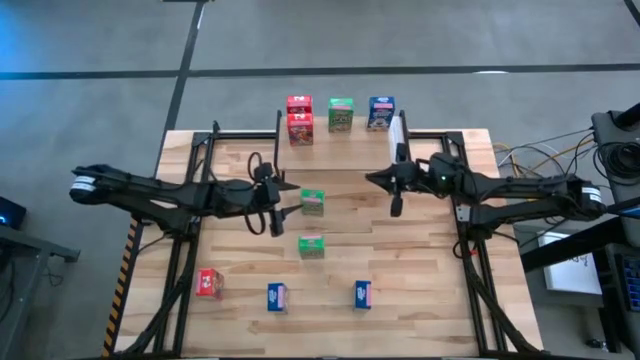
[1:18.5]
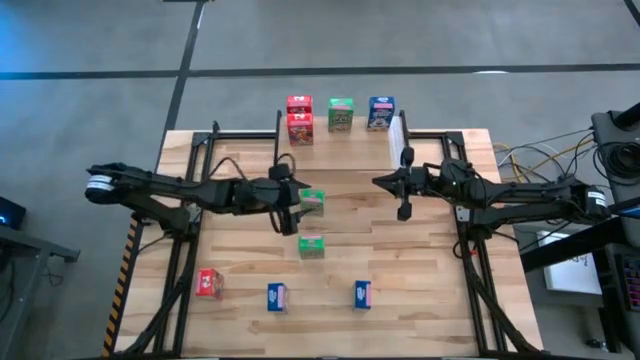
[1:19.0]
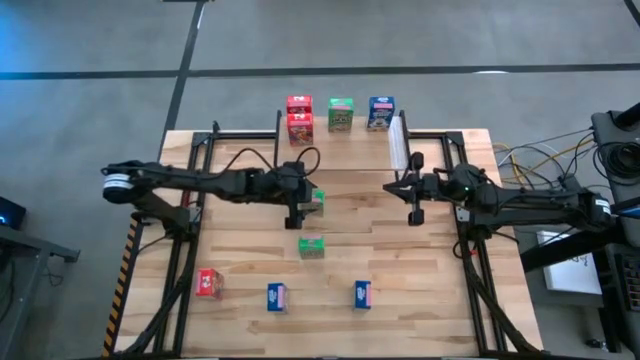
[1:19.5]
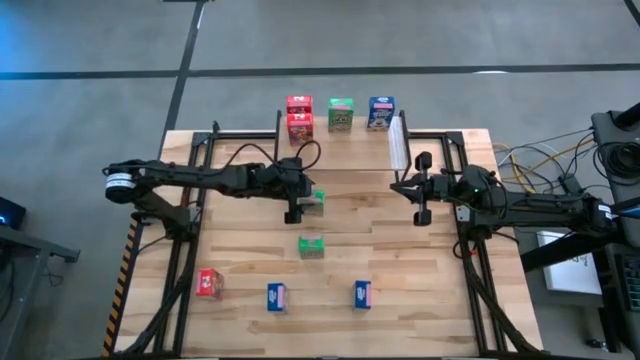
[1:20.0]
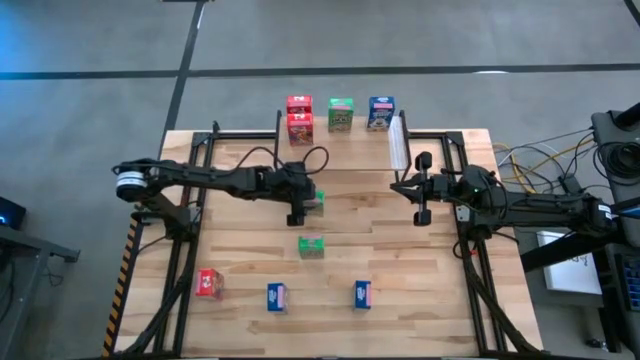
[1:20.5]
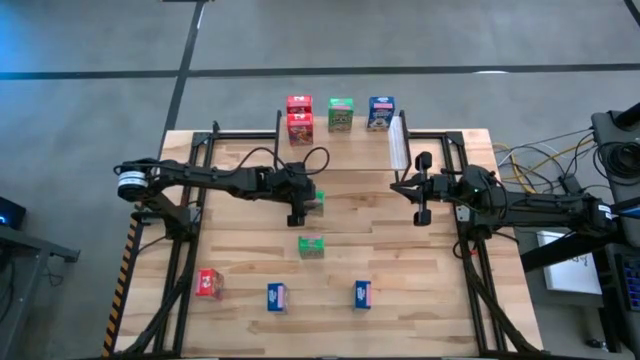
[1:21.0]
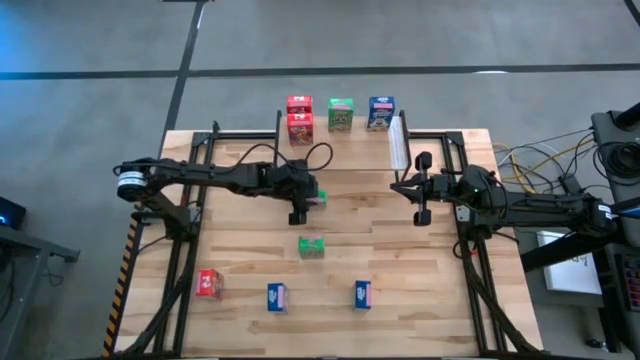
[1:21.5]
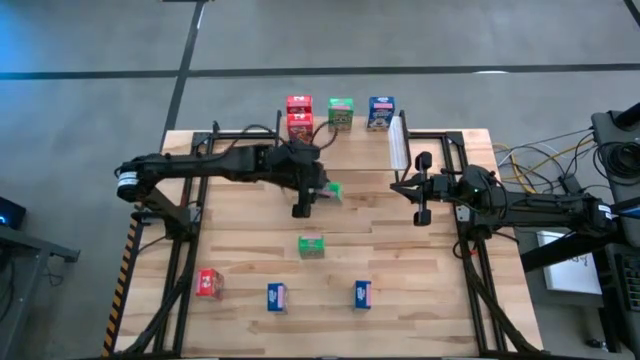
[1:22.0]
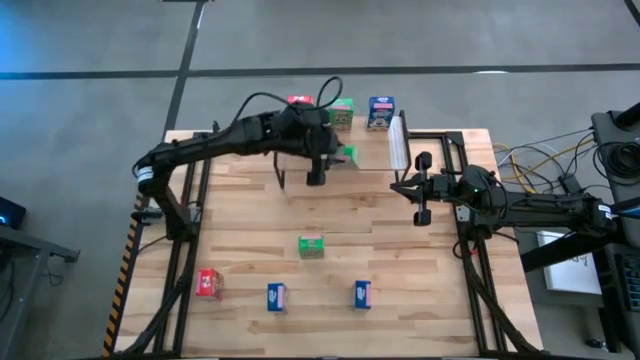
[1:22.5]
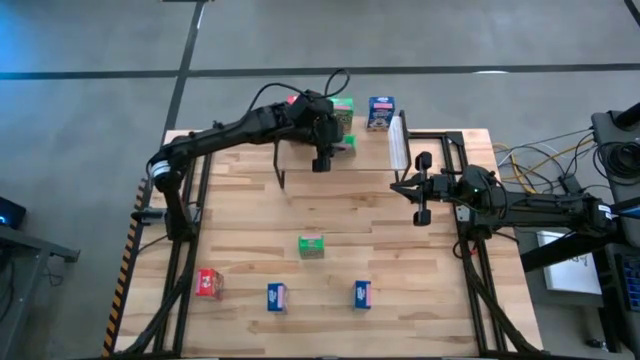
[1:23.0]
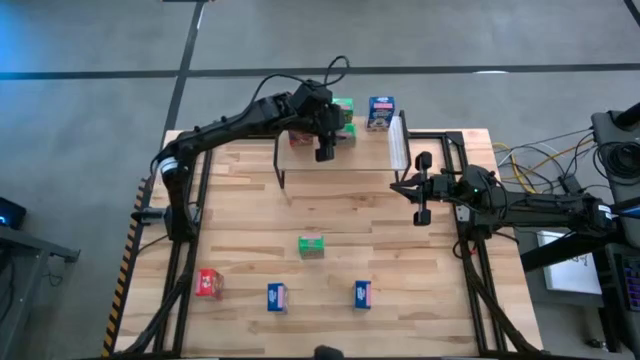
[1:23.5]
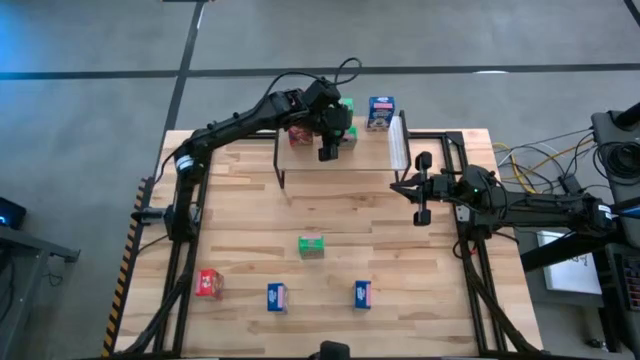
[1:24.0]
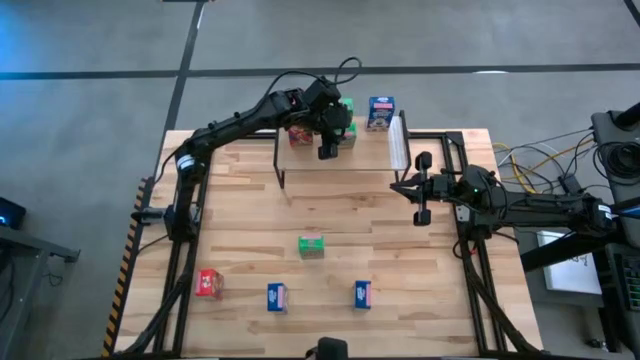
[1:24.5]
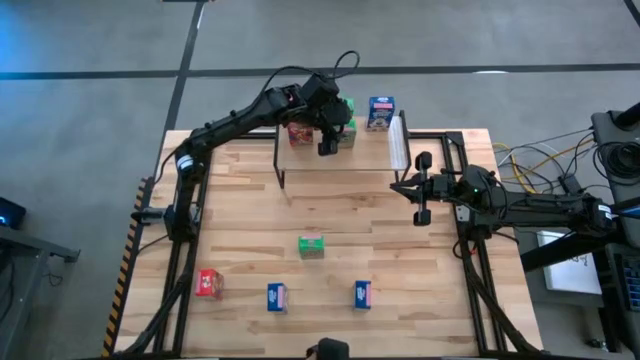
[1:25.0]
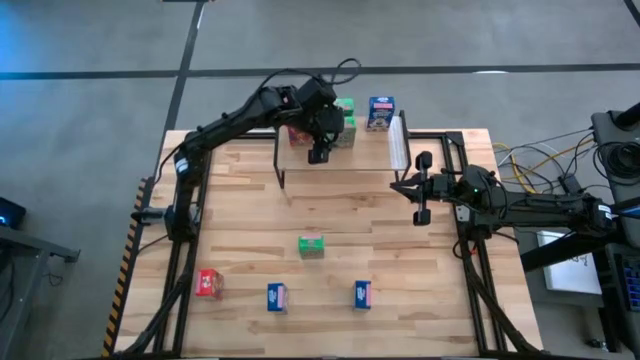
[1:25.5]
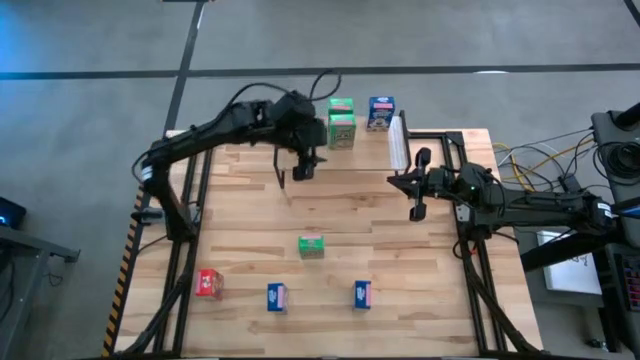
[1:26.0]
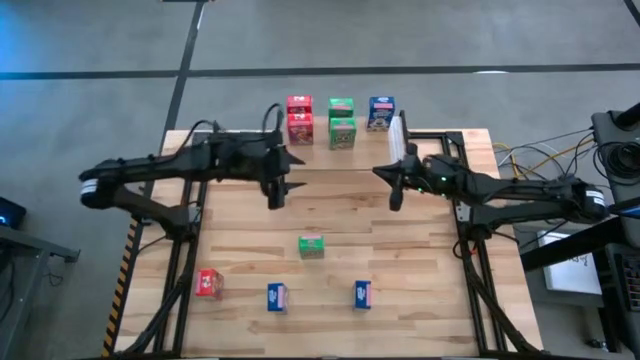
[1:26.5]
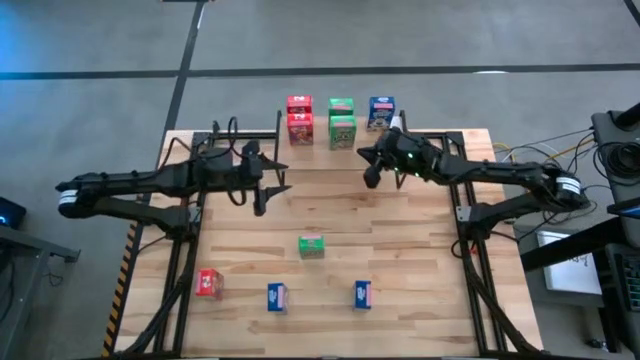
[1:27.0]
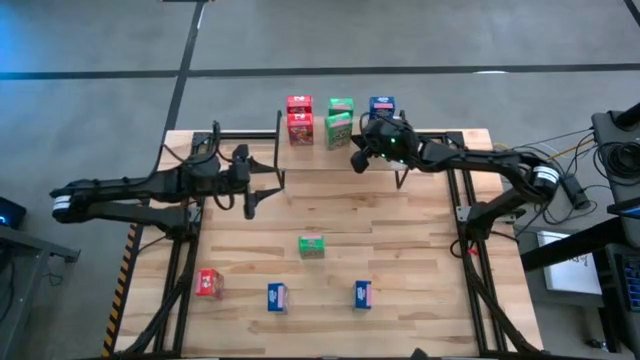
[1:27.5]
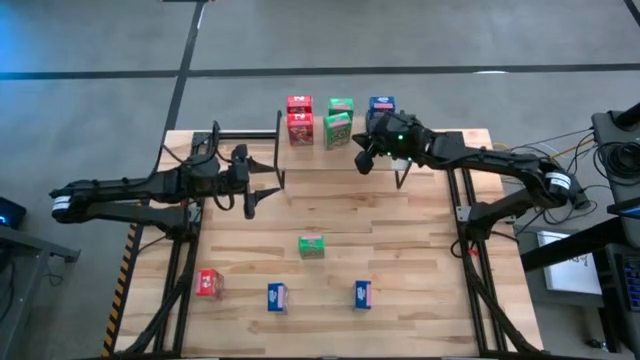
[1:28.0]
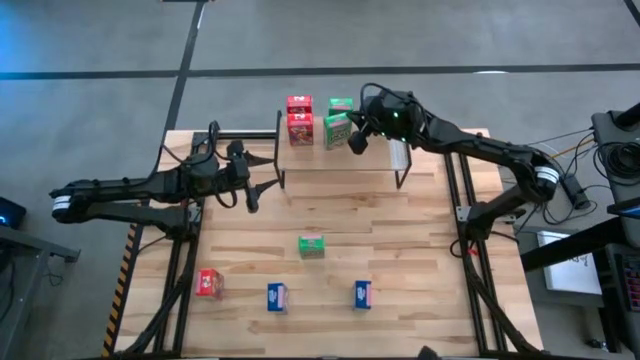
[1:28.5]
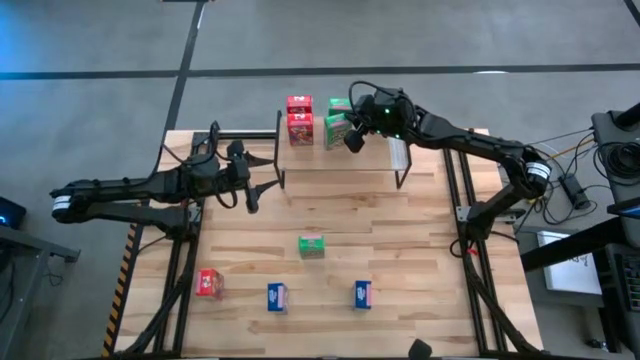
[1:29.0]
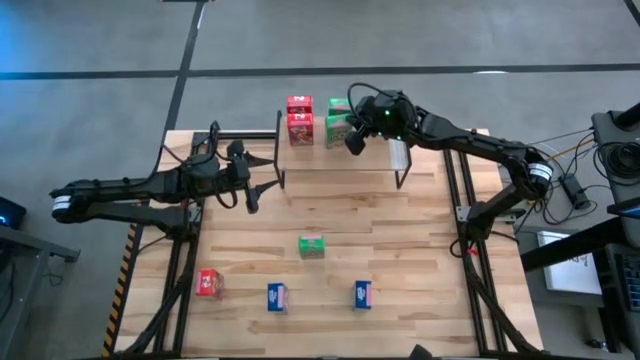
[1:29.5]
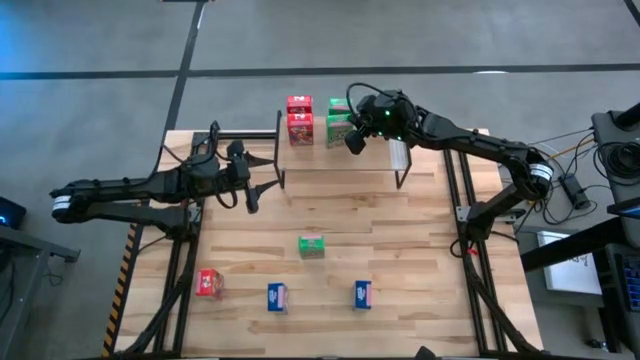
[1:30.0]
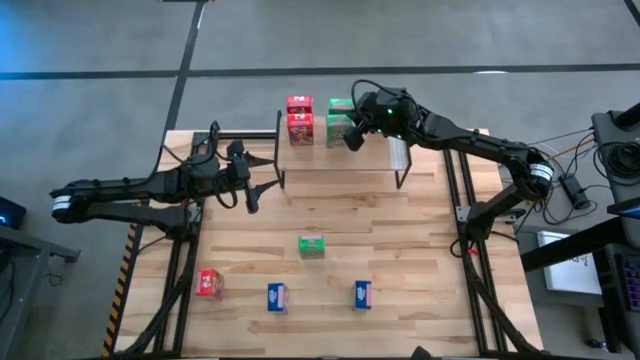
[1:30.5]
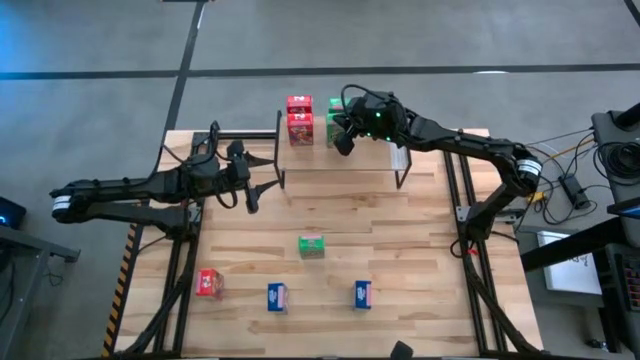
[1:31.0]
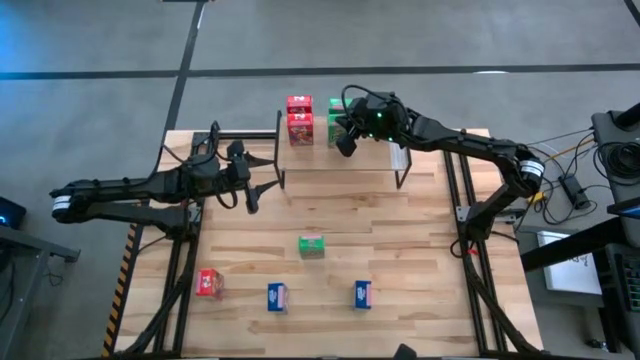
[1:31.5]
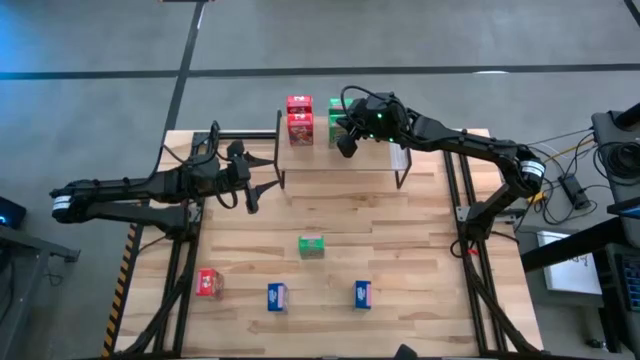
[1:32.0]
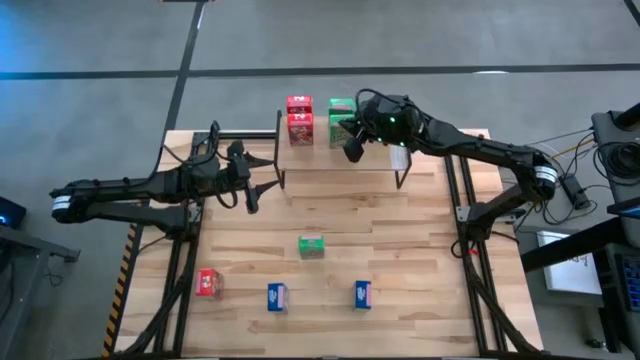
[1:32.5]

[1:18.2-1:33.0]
Task: Stack cereal on shelf
Put the top green cereal box on the shelf

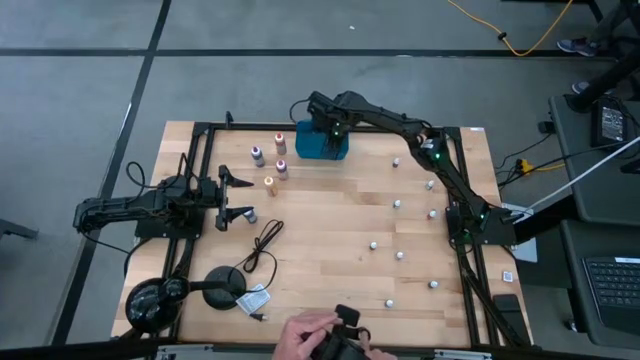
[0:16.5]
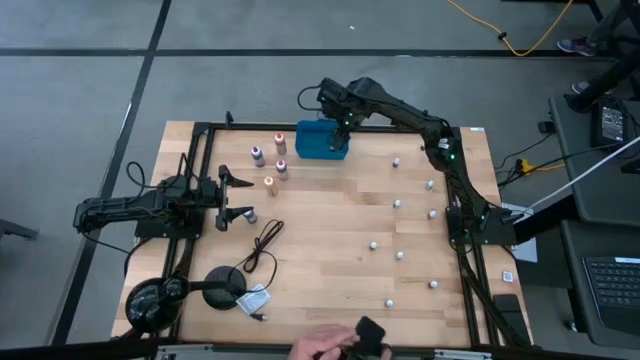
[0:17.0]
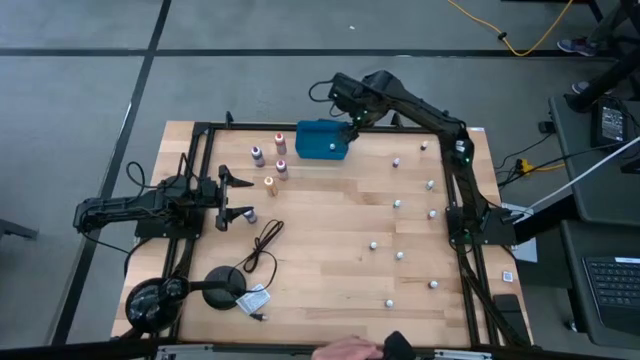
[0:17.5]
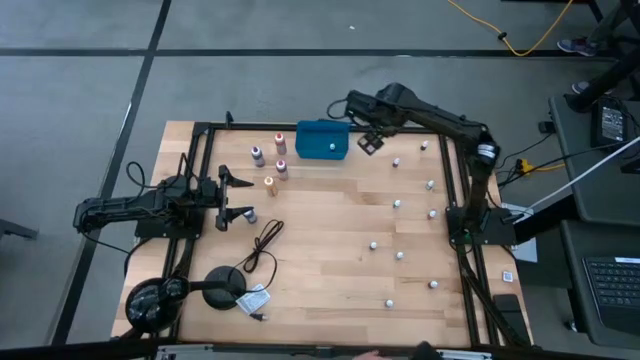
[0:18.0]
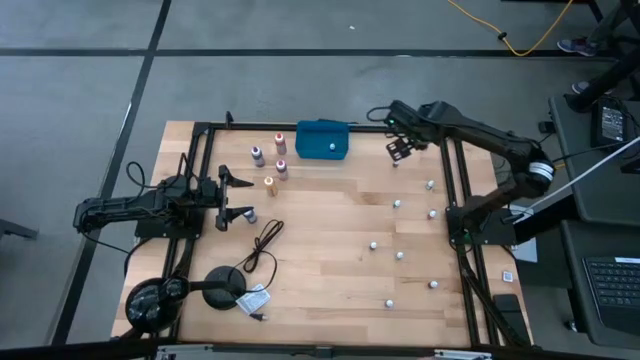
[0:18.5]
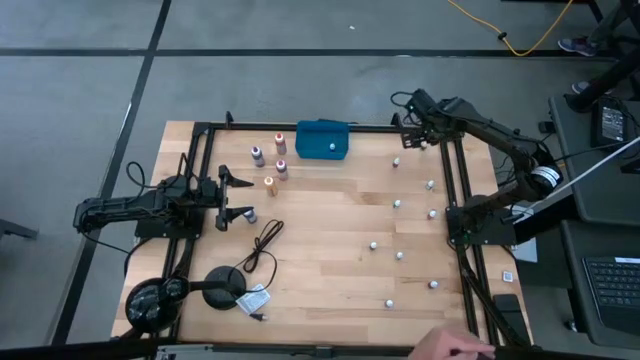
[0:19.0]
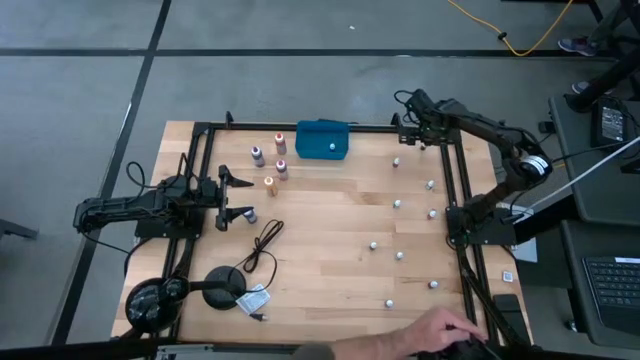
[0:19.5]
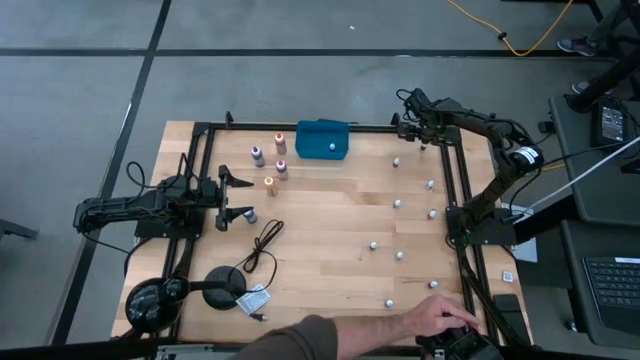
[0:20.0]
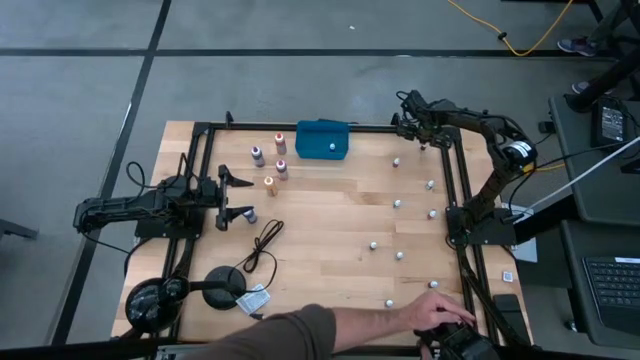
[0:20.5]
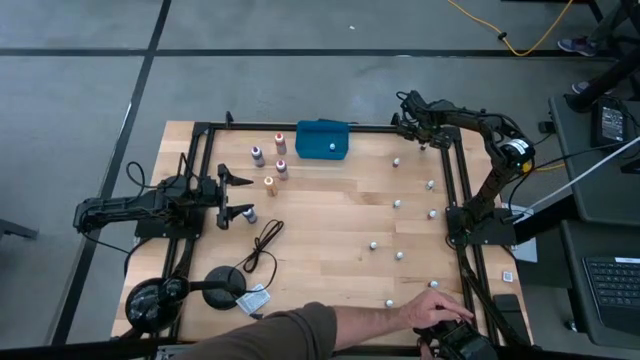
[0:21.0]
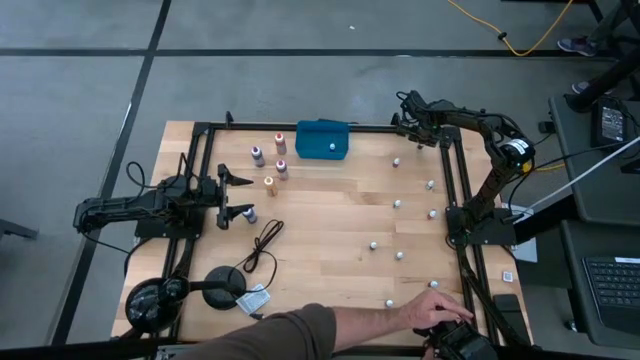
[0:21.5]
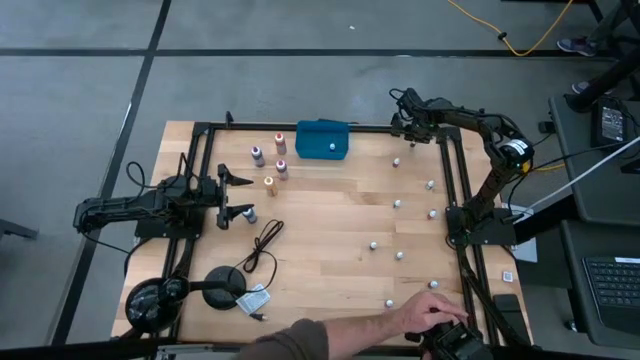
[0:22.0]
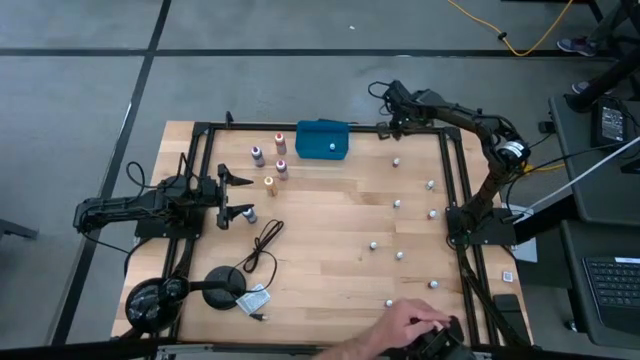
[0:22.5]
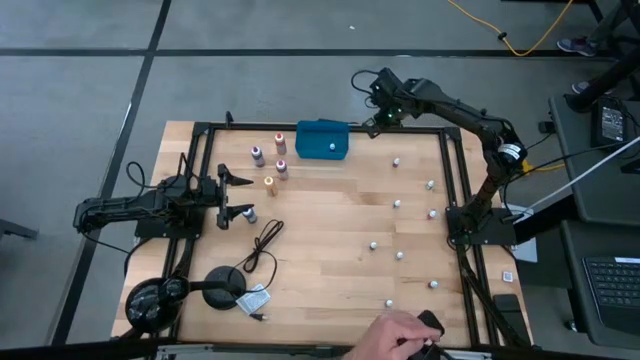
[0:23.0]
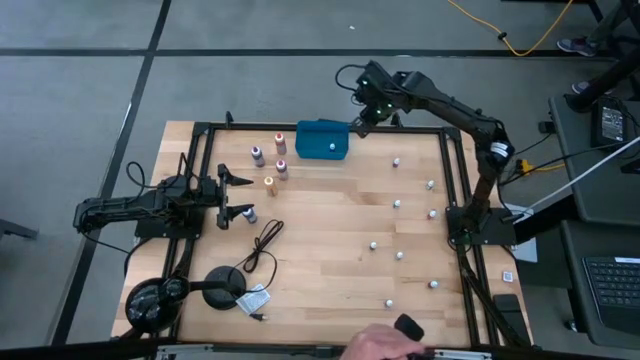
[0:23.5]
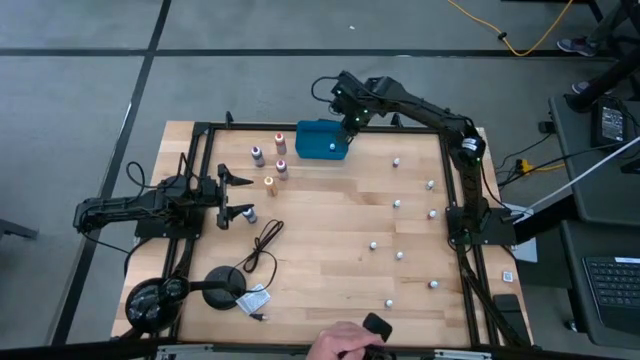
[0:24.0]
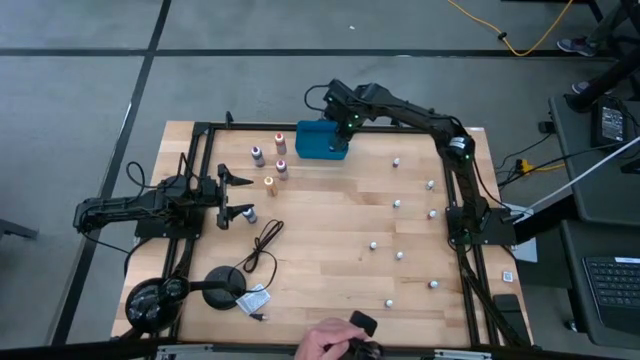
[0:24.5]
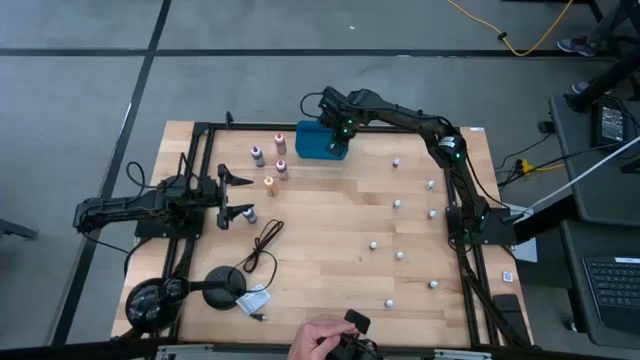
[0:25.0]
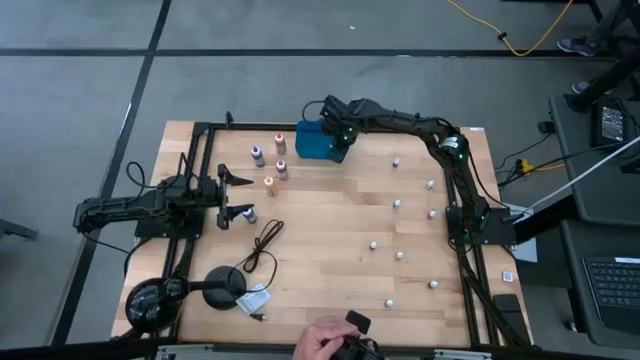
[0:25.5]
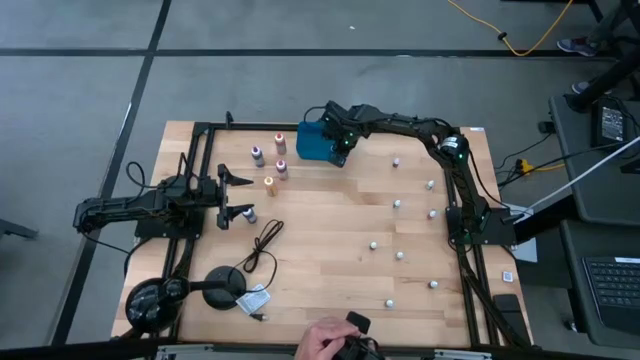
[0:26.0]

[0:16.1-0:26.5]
Task: Pick & Place food coloring
Put the small black food coloring bottle into the blue container
